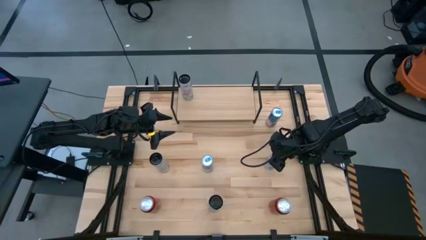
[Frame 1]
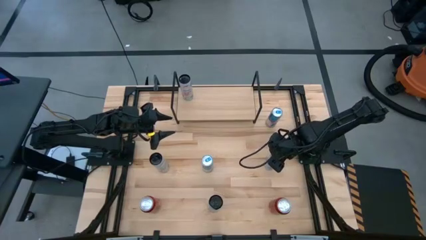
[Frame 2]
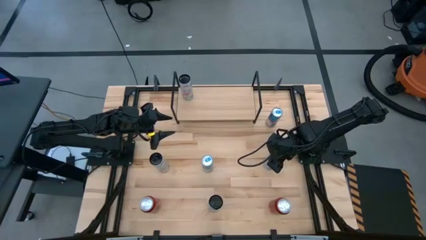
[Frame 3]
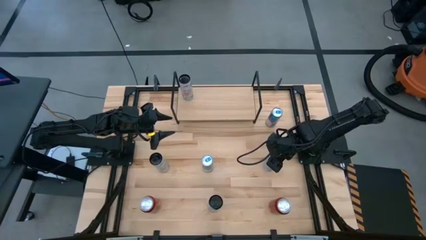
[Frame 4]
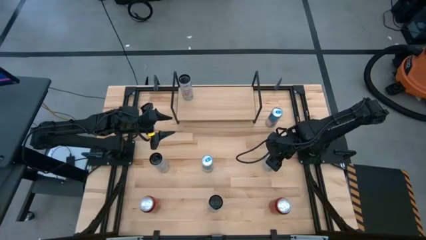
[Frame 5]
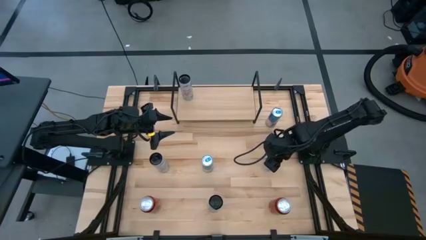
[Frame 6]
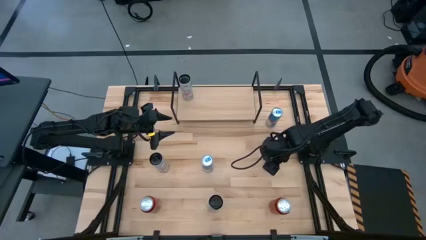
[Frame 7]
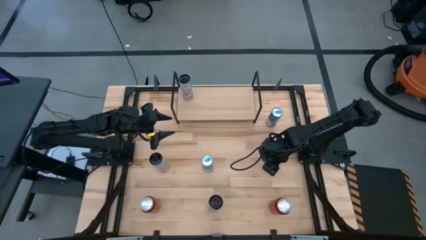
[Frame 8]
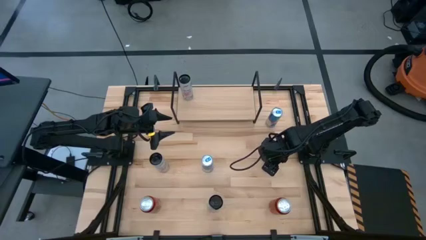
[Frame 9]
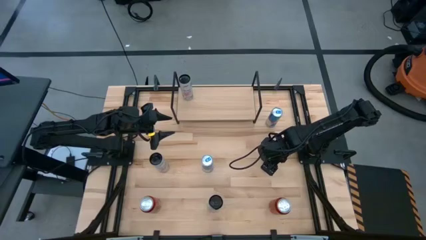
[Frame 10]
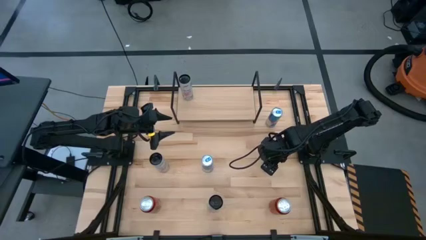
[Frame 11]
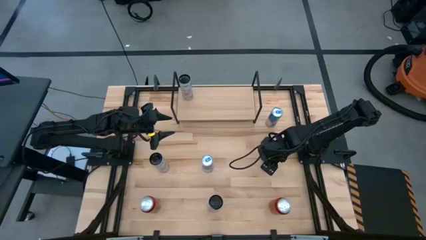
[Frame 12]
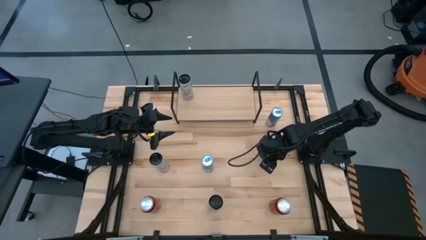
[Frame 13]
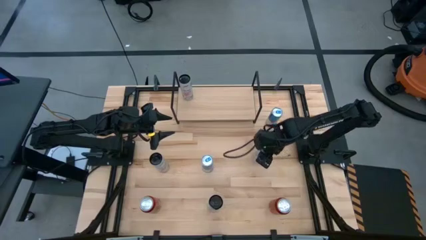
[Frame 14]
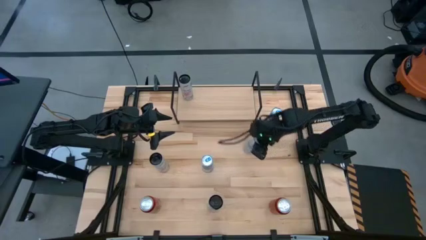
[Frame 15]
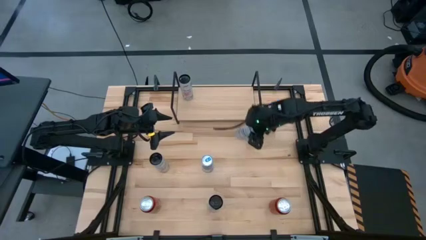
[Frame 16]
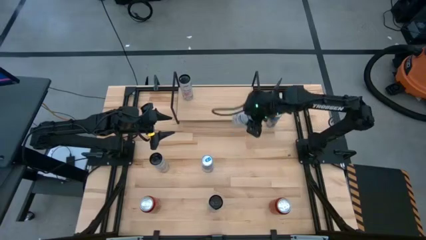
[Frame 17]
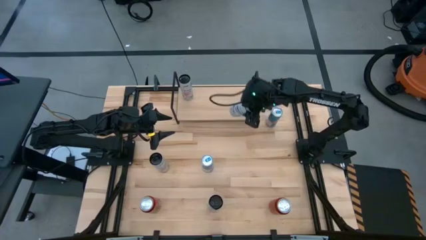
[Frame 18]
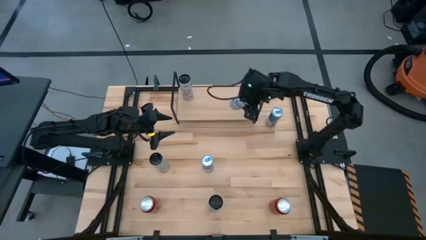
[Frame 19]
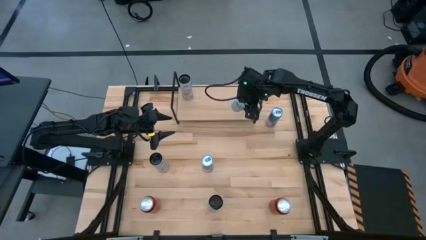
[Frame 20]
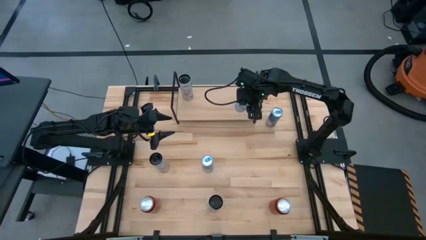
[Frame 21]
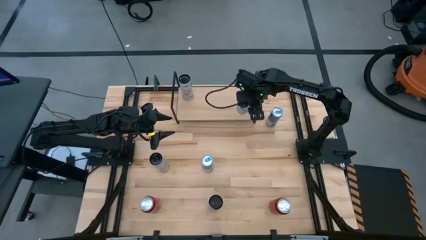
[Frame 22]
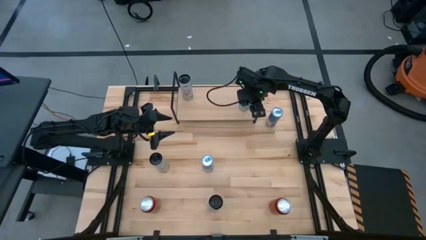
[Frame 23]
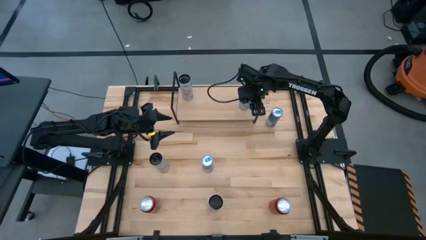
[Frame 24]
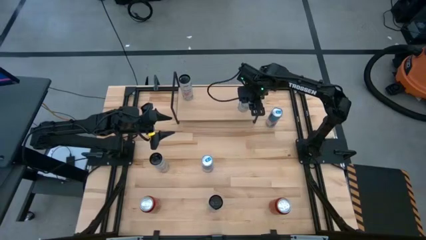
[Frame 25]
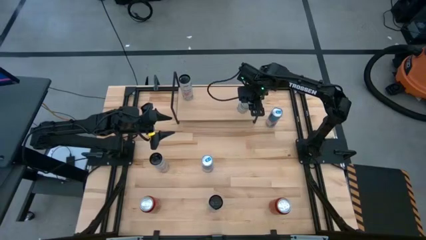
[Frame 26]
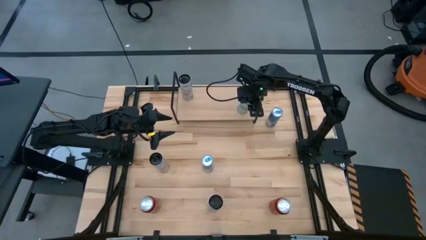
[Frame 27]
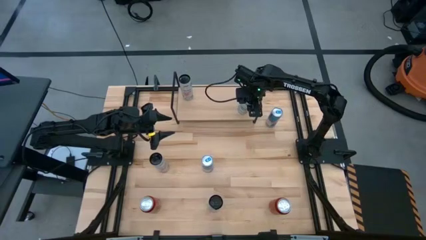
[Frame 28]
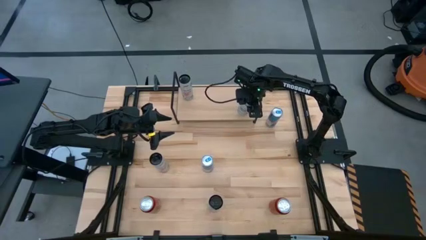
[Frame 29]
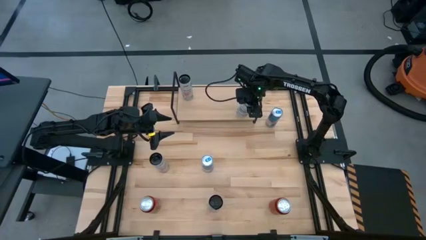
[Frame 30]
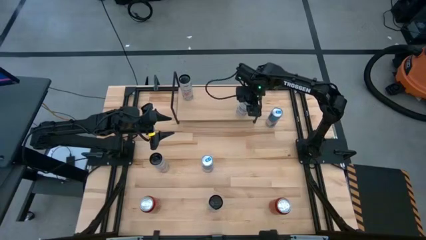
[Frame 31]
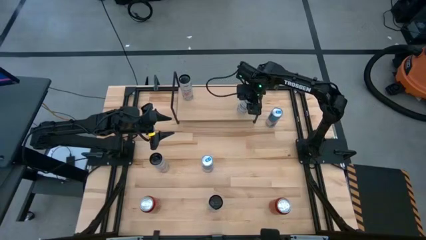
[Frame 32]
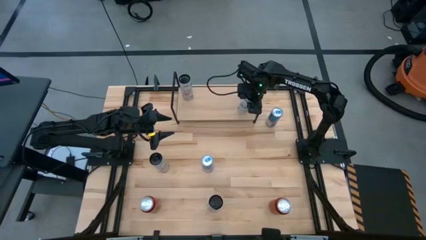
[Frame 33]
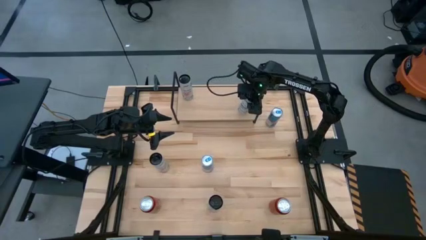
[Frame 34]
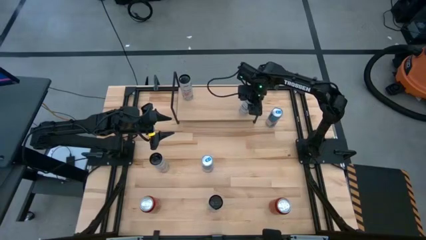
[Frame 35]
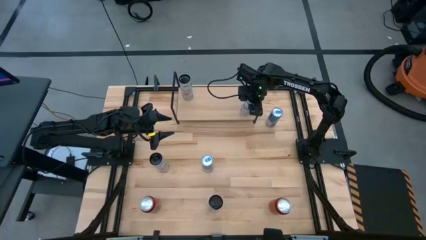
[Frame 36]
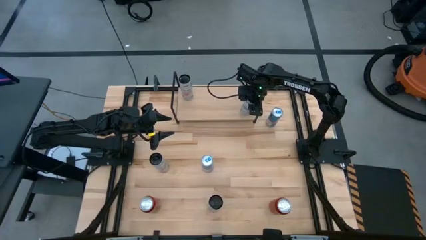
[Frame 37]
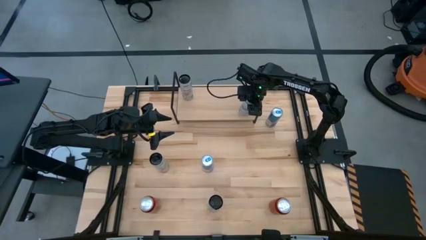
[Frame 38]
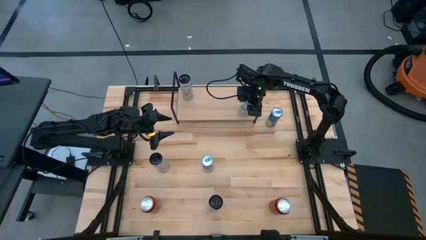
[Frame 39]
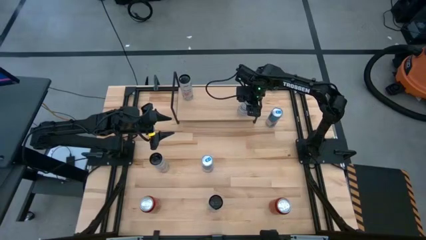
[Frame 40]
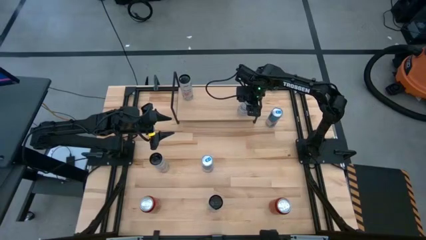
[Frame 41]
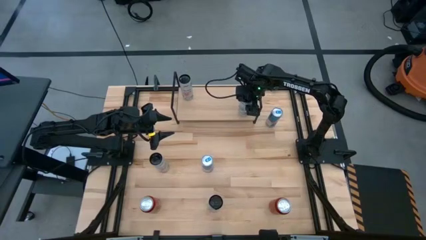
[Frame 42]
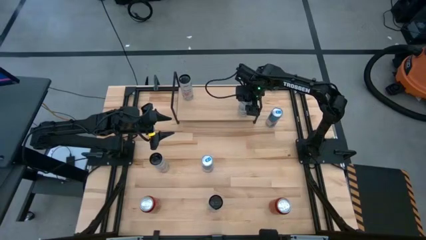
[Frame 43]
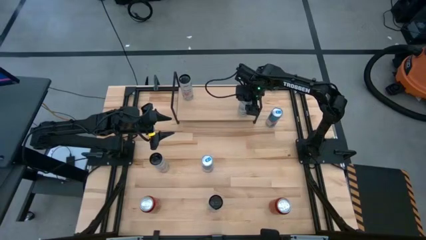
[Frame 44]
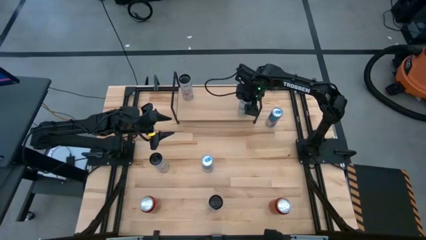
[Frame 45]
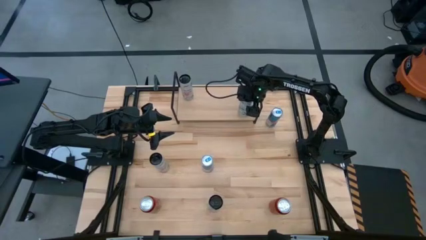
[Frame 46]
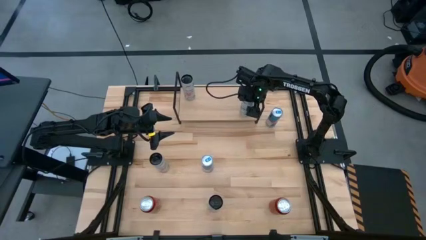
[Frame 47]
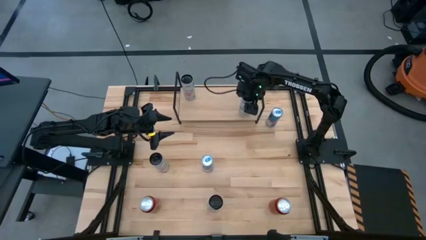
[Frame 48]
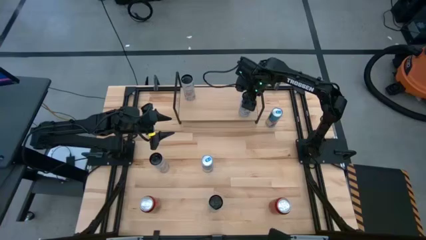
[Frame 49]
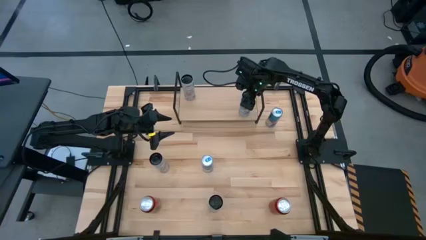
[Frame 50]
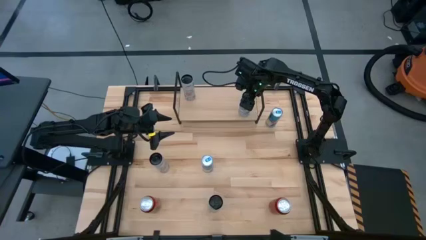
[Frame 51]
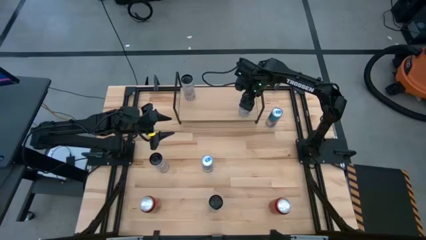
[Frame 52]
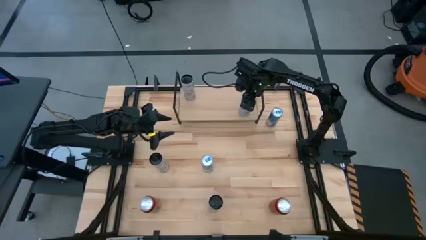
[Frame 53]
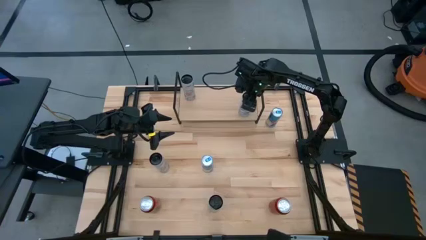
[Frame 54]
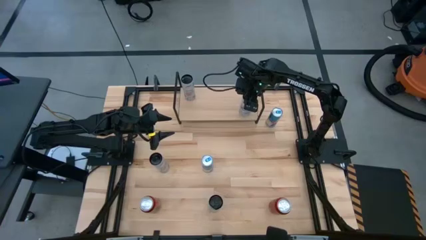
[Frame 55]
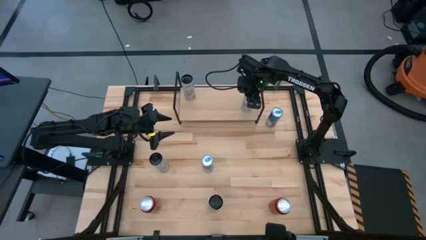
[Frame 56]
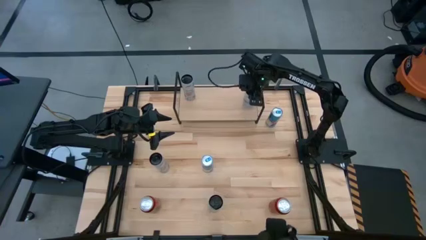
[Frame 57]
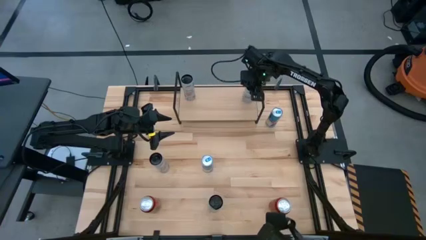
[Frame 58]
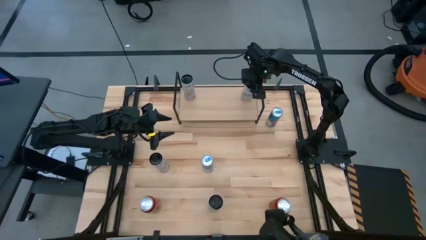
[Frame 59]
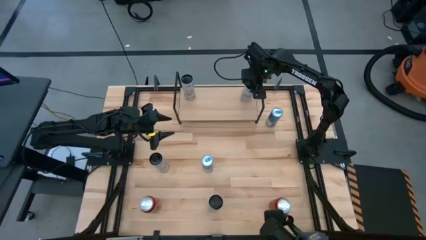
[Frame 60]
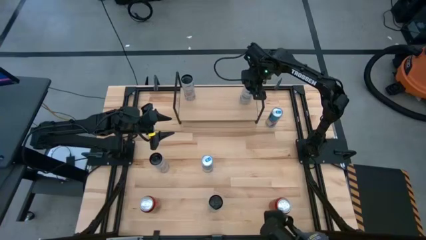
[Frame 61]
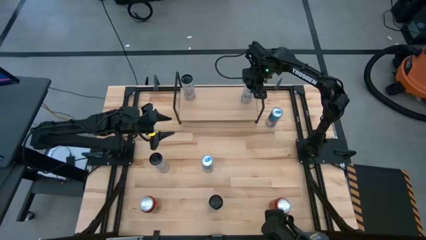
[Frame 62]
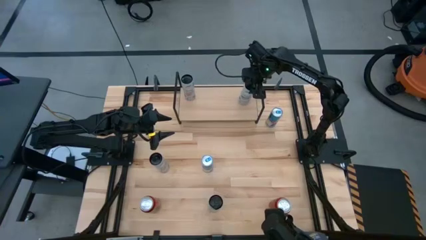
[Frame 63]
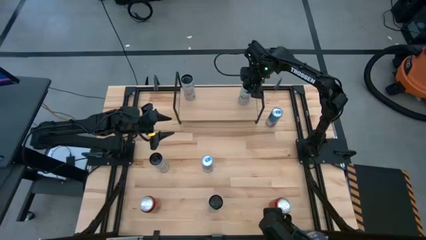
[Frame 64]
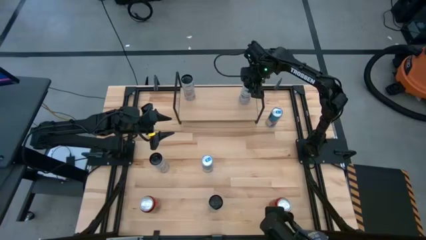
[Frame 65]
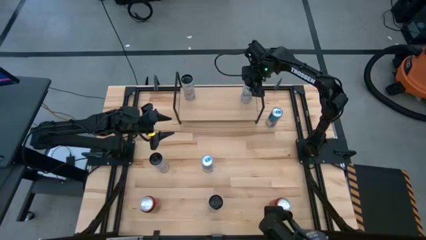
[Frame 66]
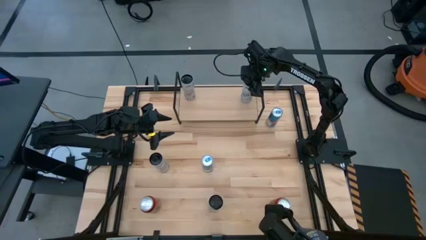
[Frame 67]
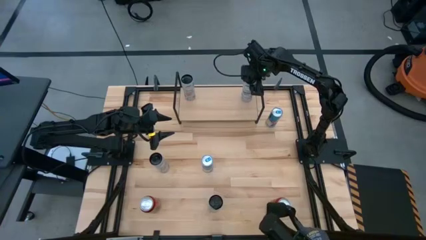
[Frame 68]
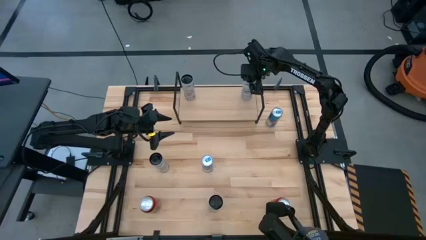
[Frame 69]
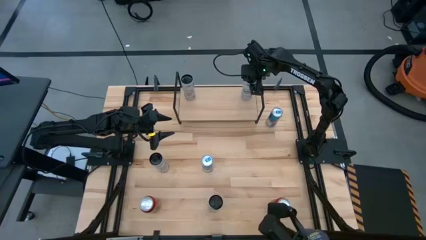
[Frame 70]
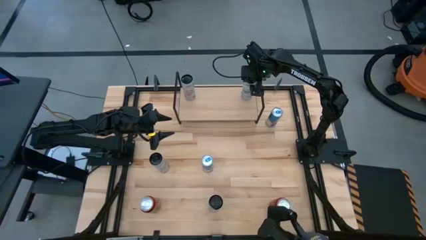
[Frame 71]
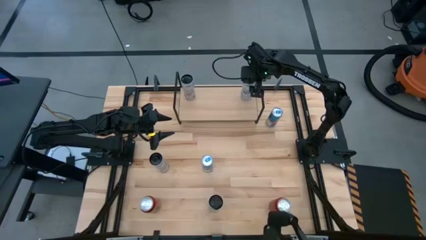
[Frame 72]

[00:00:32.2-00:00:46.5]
Task: Place canned beverage on shelf
Put the top white blue soda can on the shelf

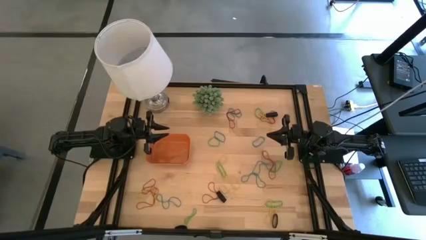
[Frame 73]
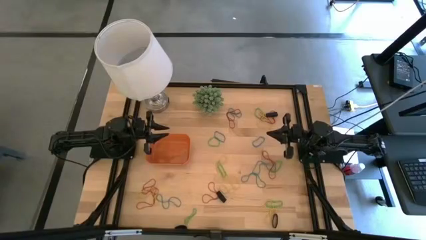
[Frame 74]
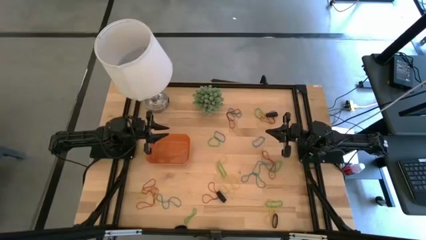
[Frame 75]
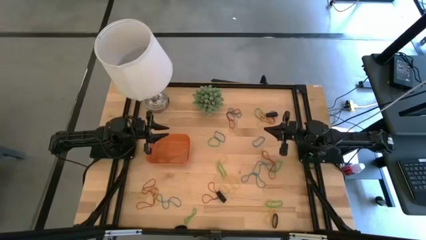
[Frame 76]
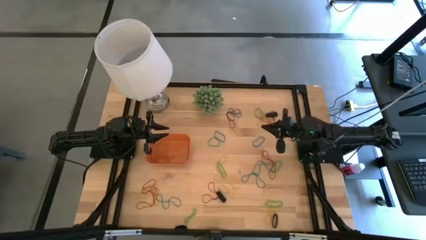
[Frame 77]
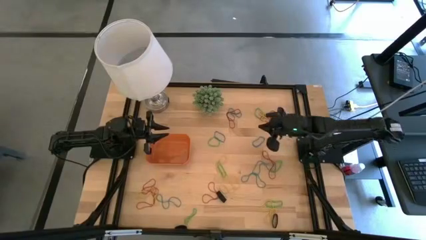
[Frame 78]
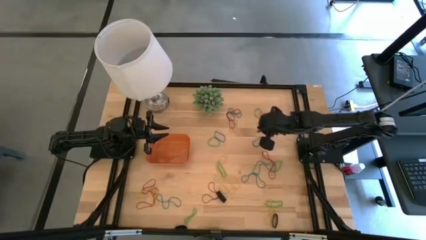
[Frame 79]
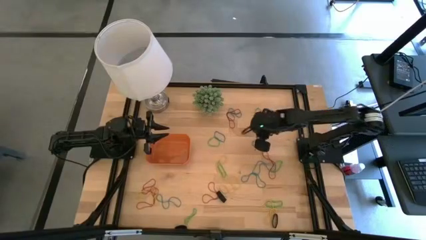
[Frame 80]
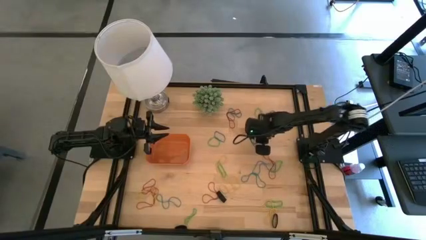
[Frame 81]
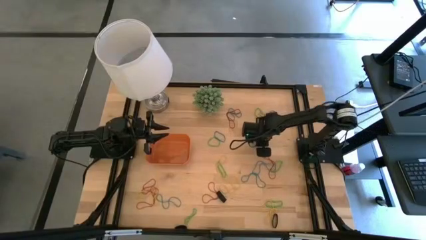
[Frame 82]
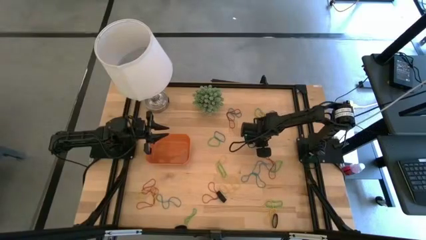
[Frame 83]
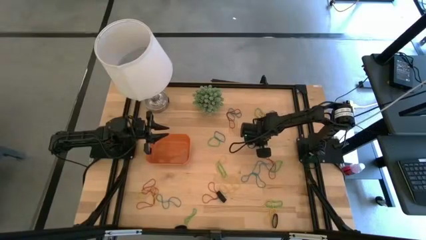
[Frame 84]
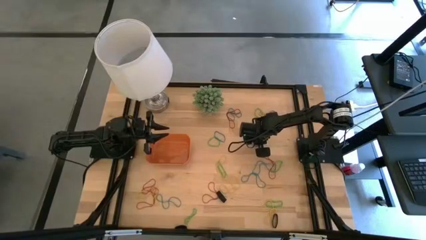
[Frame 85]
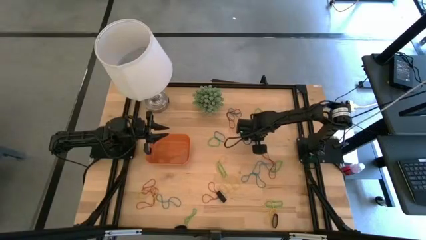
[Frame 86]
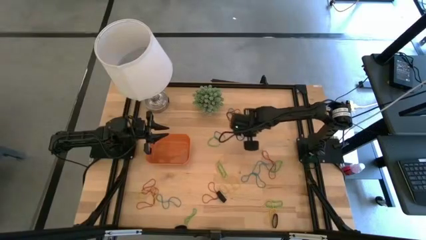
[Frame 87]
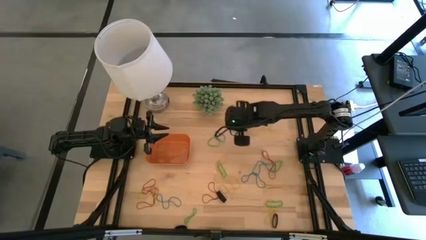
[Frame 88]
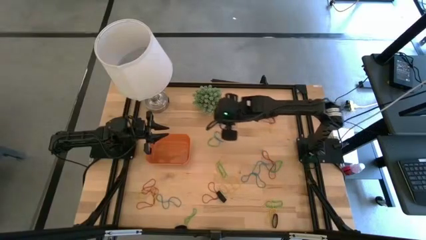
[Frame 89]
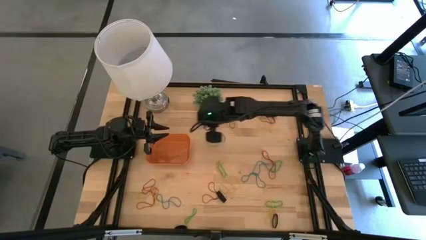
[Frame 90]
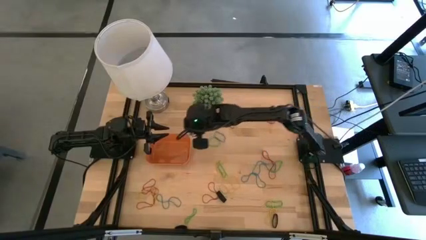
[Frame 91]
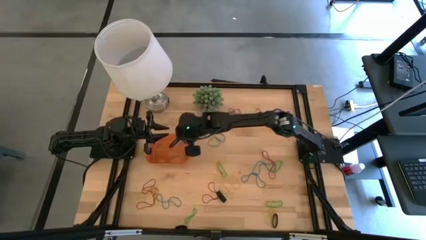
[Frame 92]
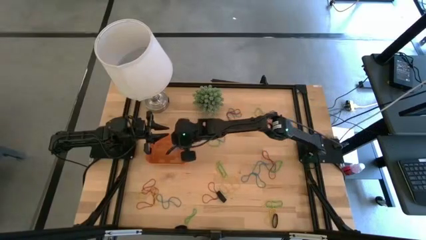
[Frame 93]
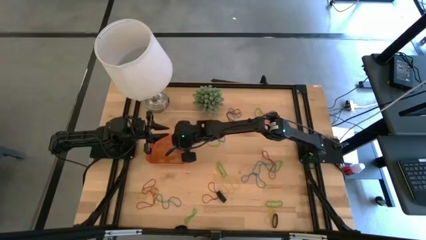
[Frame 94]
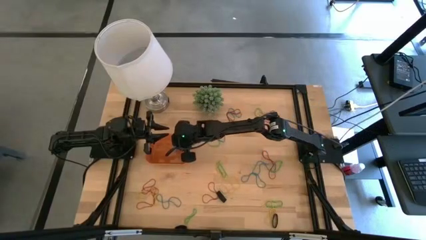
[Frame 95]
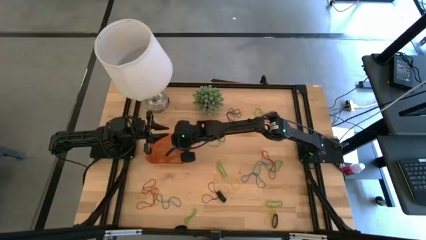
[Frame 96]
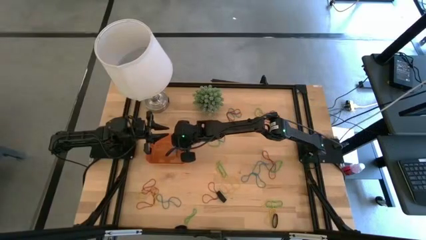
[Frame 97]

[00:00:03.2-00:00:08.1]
Task: Pick and place rubber bands into bin
Put the blue rubber band into the orange bin
